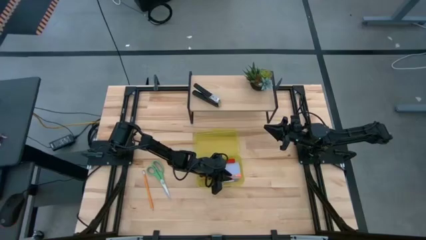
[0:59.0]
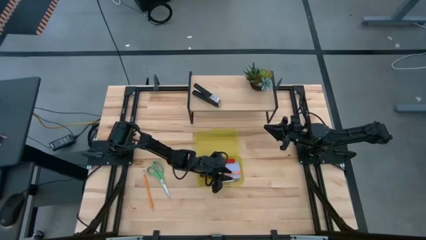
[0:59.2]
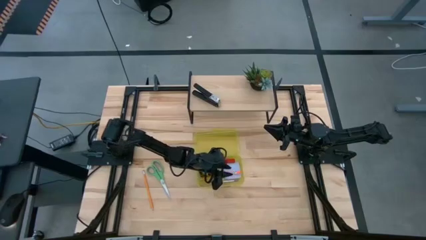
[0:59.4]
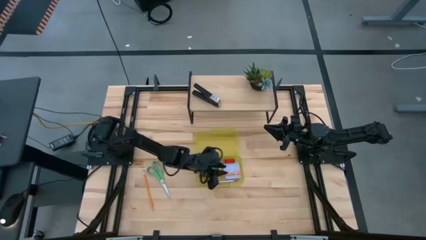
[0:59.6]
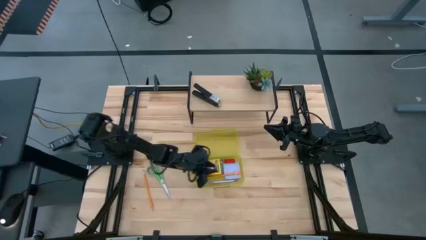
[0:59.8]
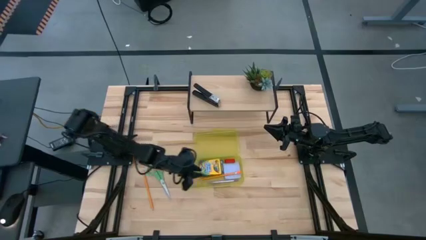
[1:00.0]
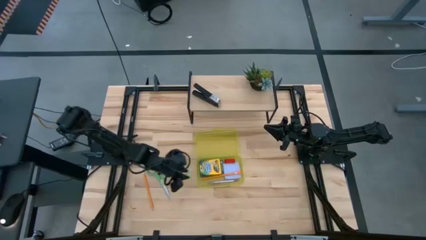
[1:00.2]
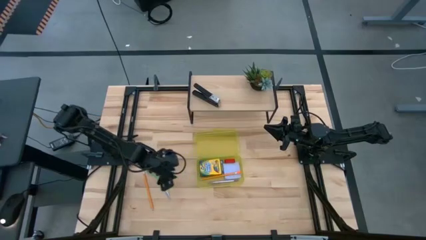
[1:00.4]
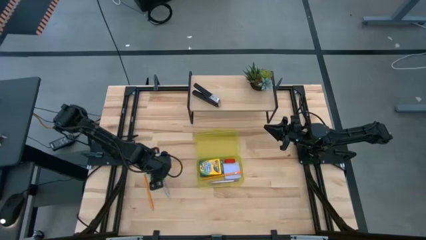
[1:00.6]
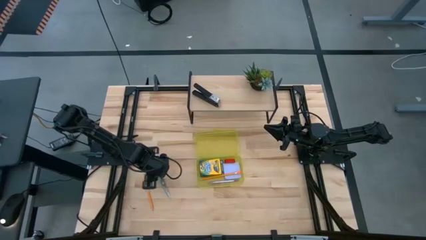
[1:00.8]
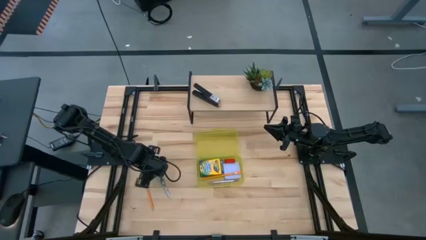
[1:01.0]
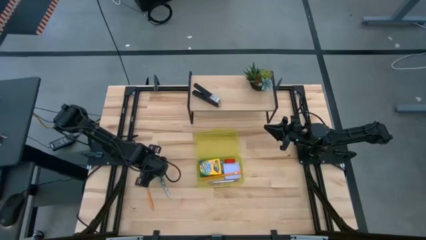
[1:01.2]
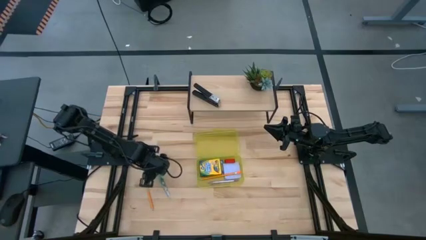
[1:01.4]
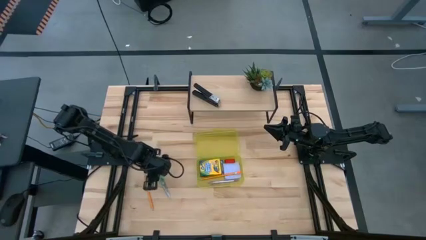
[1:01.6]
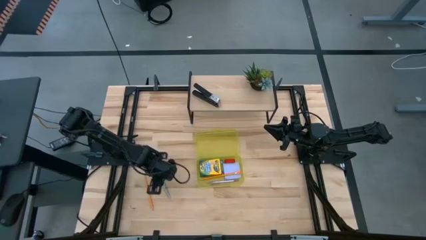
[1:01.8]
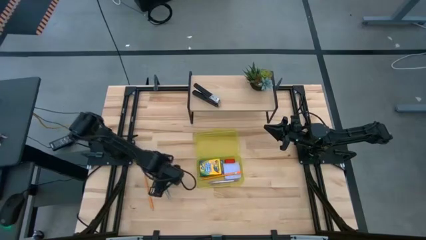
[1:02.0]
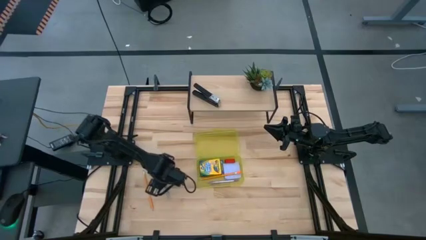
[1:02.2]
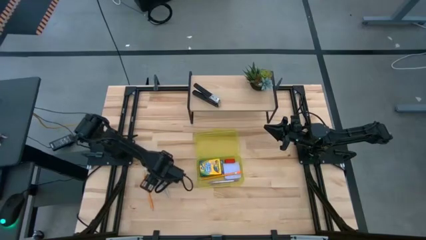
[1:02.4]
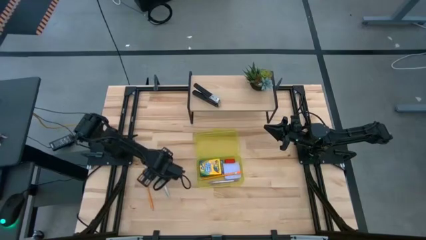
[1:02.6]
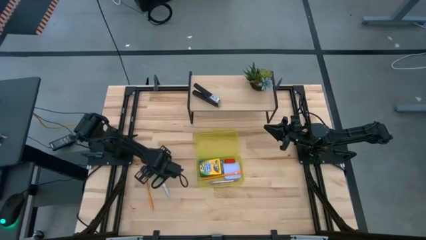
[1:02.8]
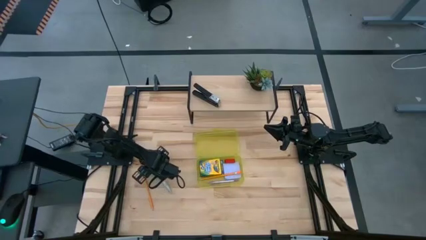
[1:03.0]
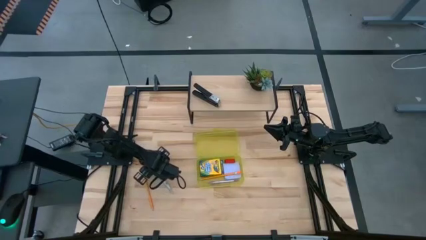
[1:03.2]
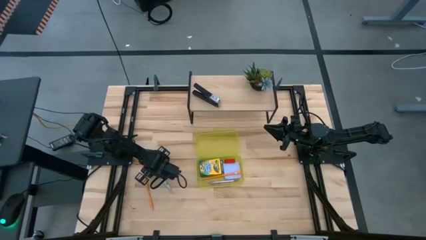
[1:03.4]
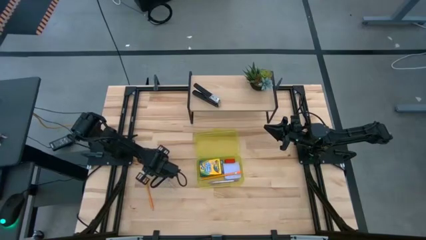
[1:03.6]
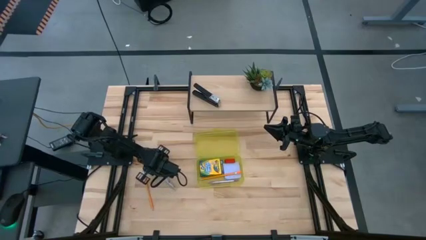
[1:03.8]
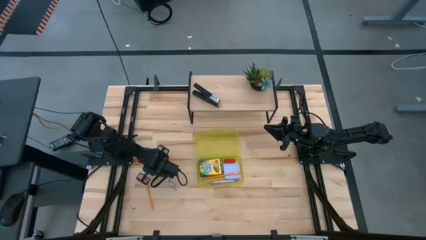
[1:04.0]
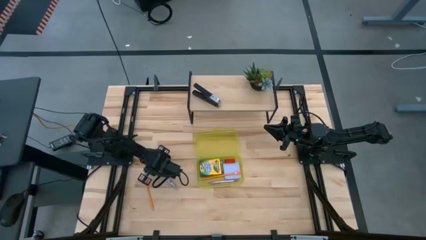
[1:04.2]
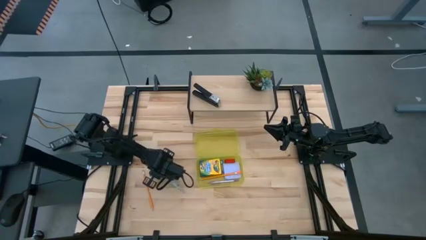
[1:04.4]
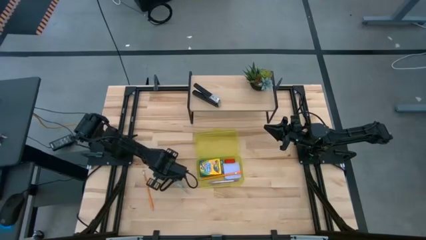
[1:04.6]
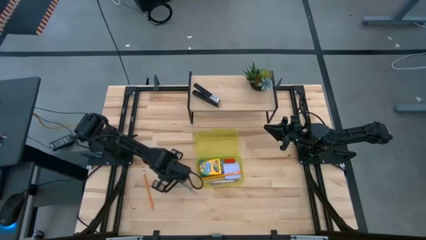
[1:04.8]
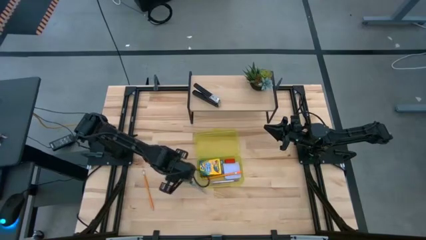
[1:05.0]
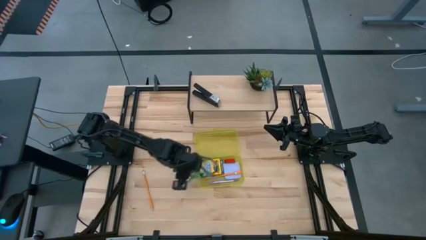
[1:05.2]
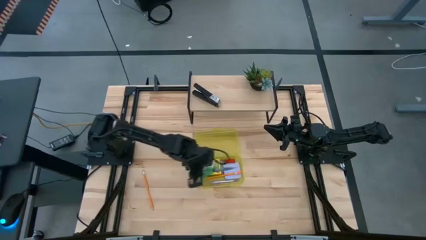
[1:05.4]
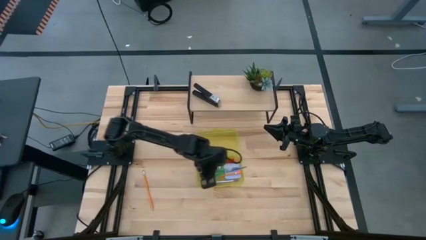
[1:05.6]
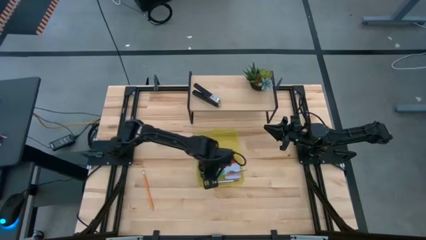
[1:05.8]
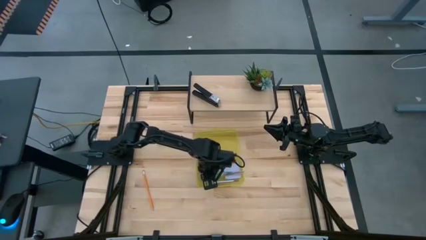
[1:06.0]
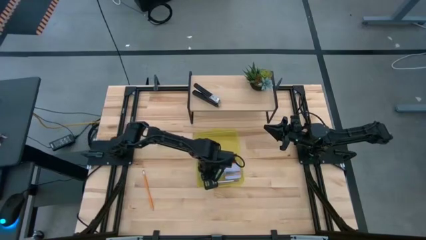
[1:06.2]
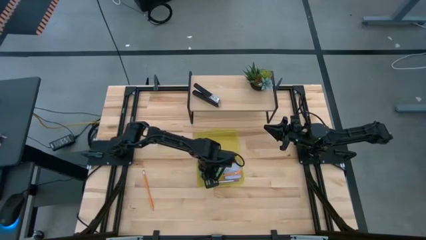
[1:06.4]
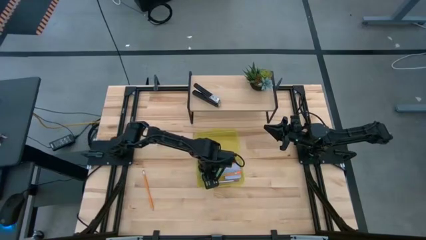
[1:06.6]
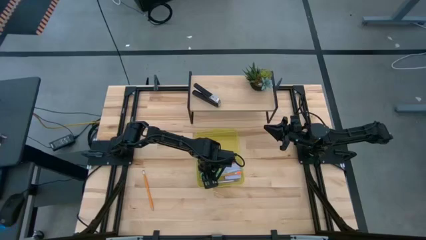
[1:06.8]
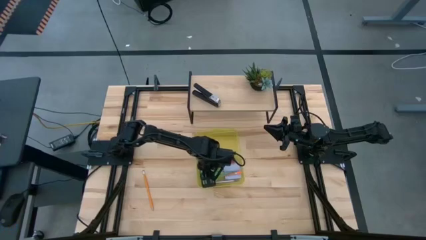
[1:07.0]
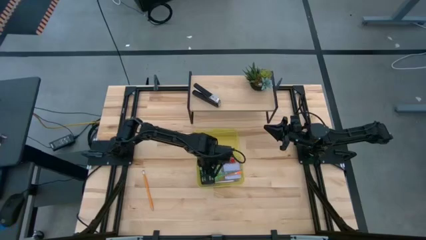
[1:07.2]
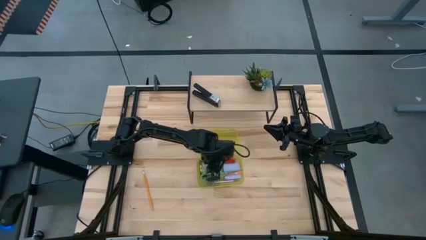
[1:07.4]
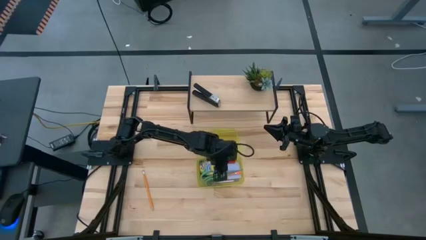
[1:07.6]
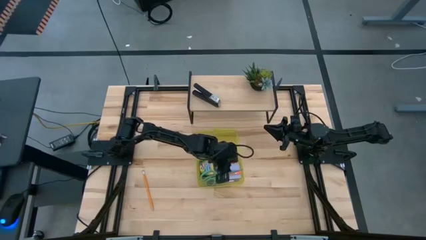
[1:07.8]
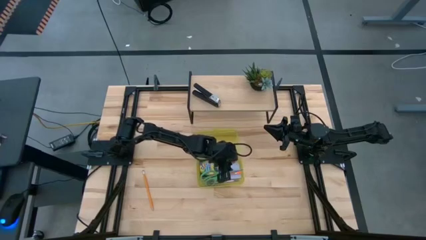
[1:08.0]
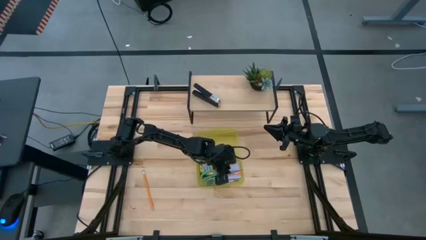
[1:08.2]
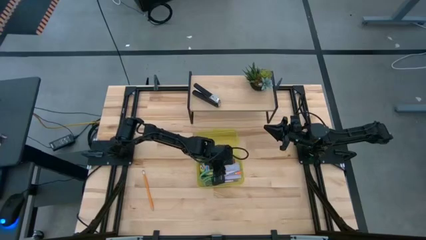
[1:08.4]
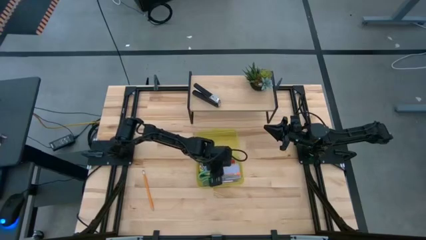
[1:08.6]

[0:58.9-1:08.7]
Task: Pack school essentials
Put the green scissors into the yellow supply box

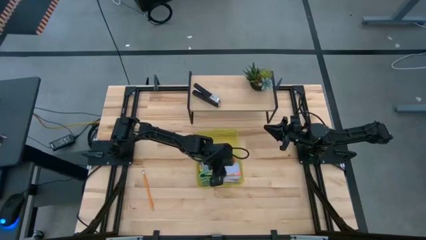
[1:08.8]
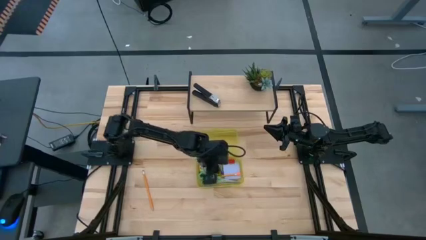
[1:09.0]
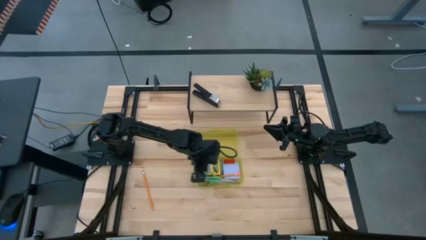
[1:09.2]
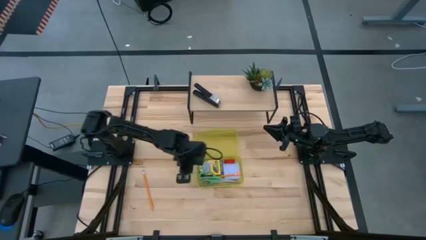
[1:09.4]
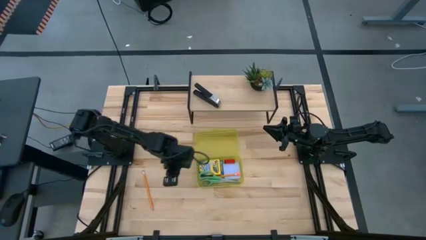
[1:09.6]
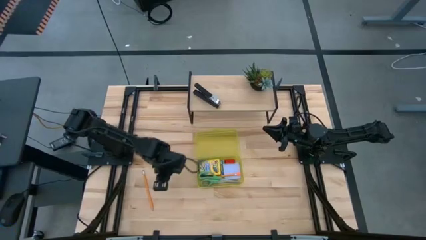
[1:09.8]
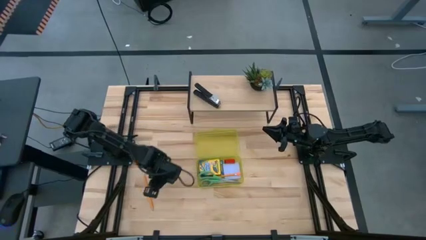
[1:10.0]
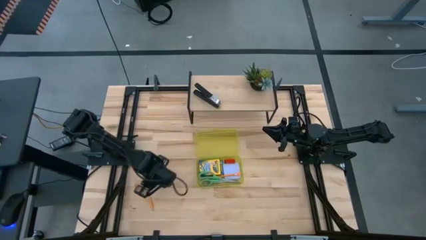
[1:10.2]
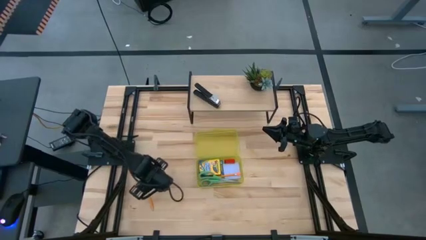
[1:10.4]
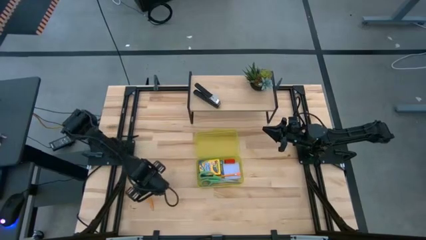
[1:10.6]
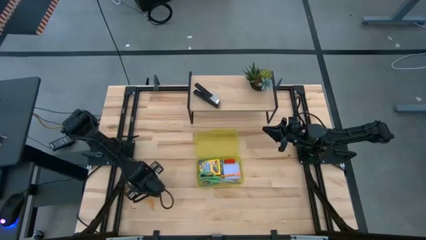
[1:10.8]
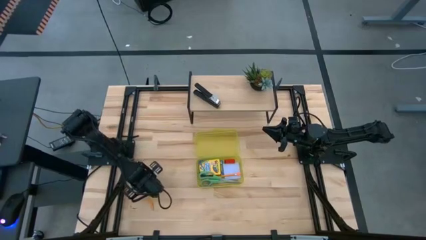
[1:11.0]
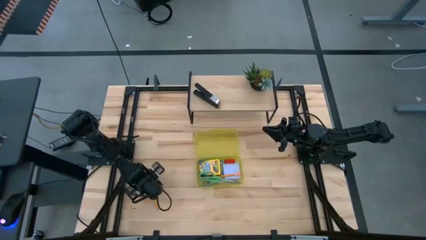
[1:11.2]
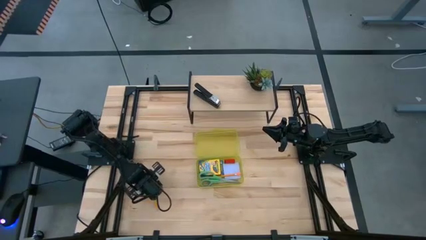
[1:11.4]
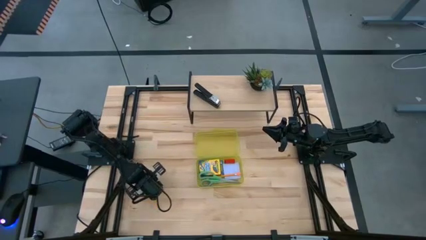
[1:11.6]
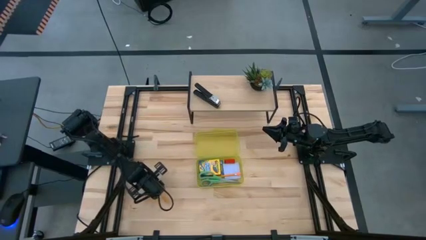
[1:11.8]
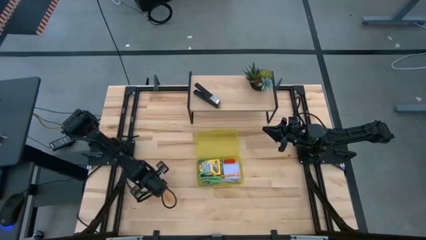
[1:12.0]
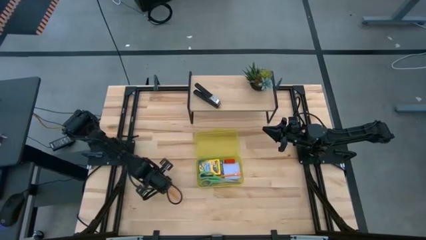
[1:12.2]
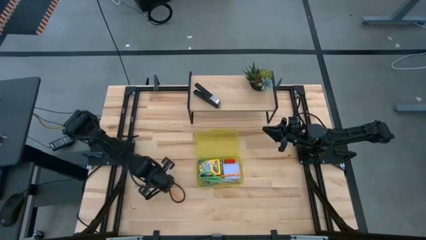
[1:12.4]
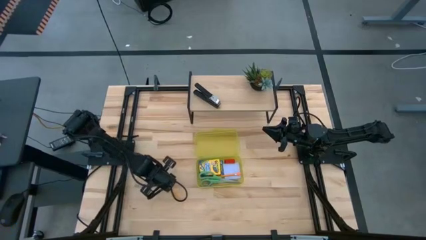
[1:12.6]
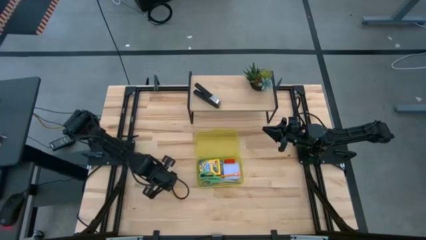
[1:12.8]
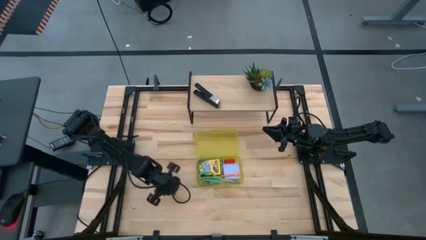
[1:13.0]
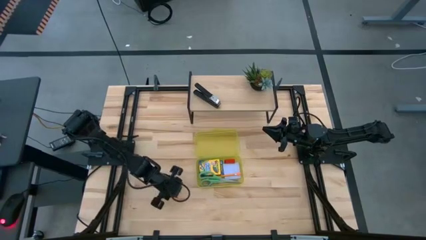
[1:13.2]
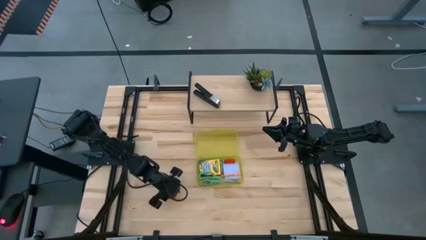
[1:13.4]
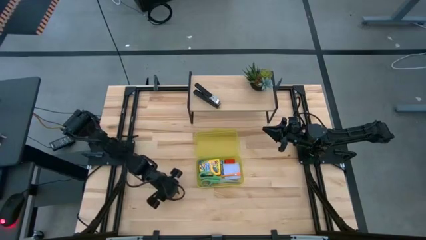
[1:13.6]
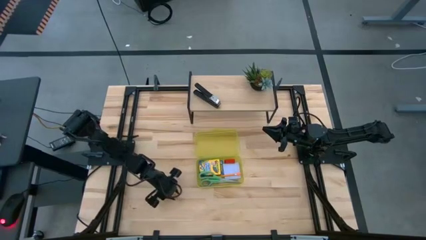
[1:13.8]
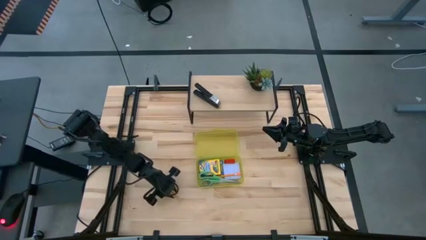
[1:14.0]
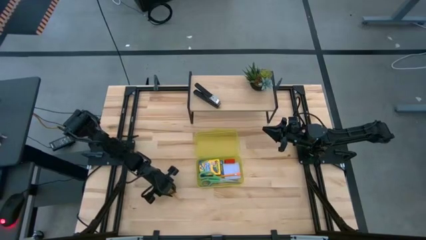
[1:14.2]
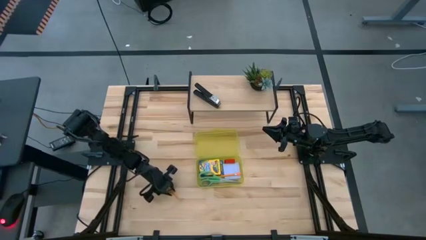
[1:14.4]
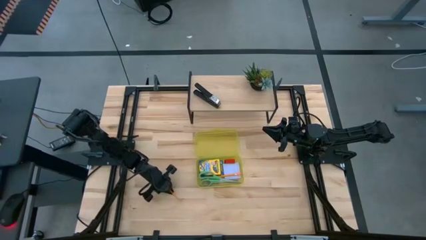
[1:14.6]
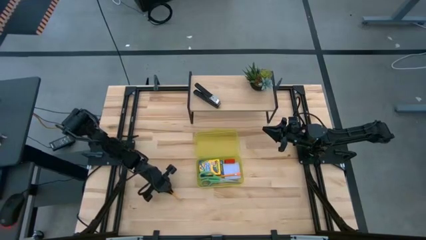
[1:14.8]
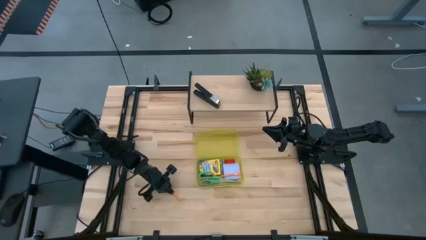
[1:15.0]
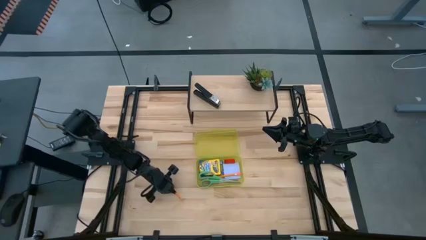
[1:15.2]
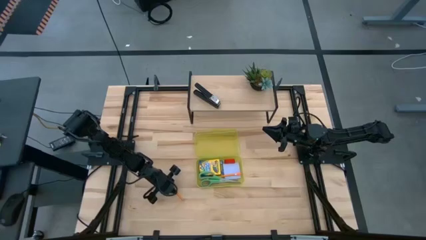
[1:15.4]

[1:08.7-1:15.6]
Put the yellow pencil into the yellow supply box
